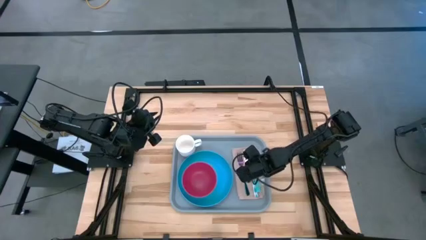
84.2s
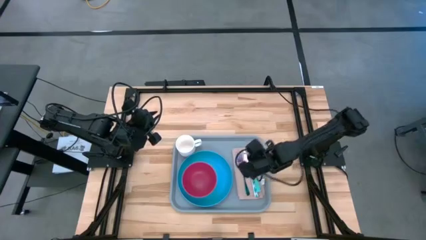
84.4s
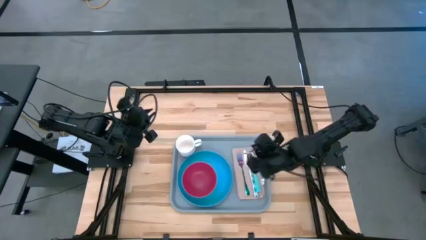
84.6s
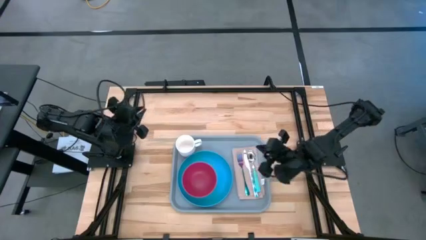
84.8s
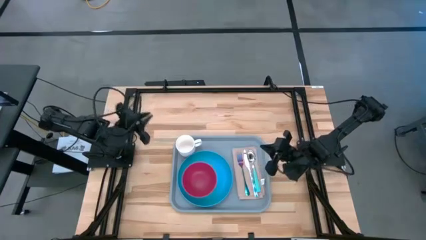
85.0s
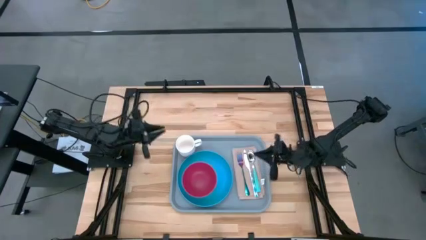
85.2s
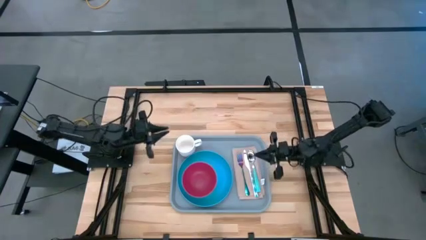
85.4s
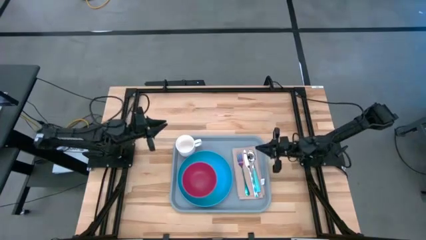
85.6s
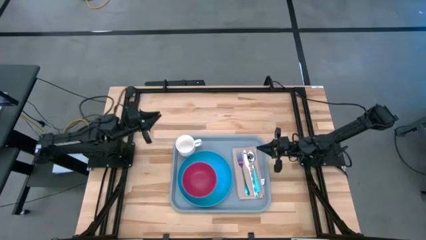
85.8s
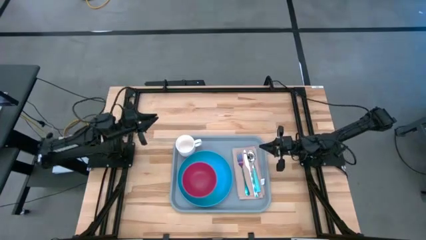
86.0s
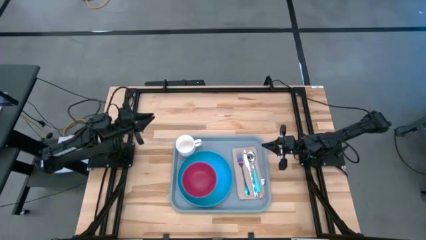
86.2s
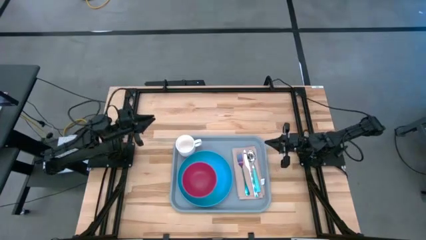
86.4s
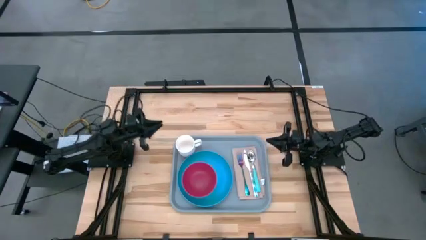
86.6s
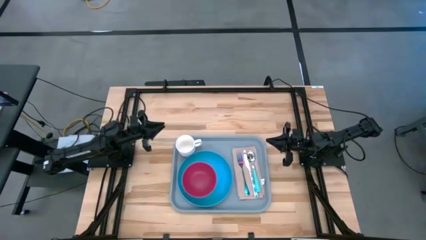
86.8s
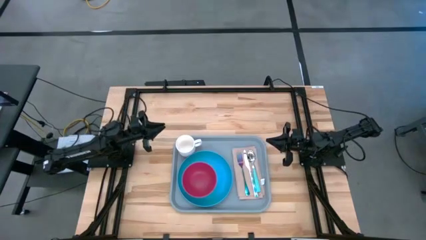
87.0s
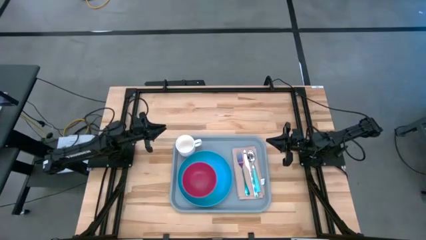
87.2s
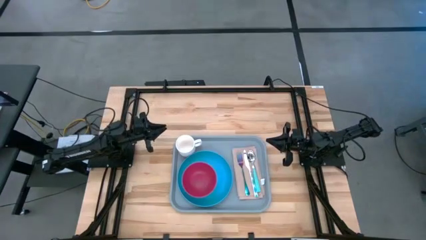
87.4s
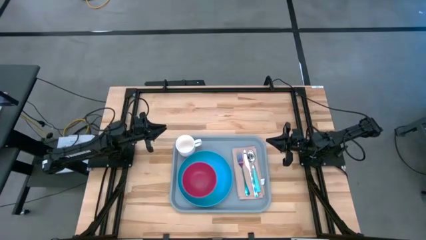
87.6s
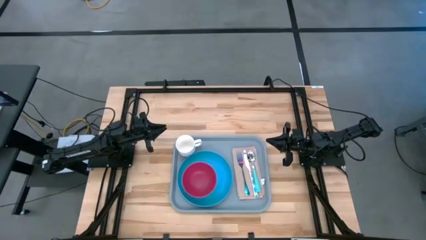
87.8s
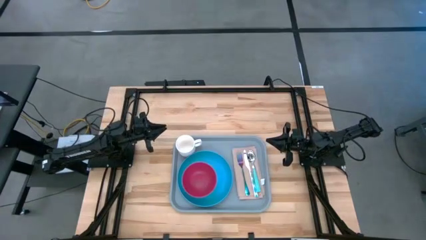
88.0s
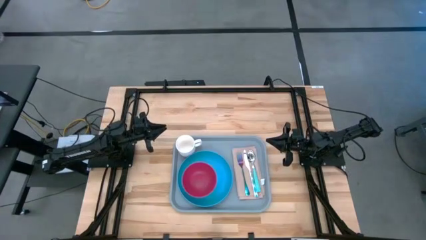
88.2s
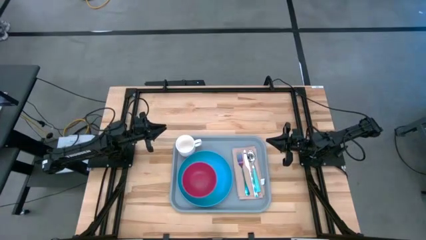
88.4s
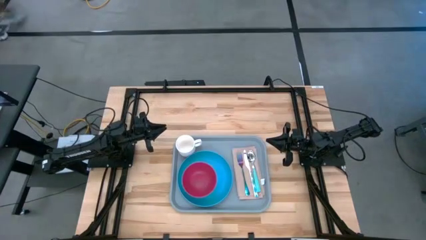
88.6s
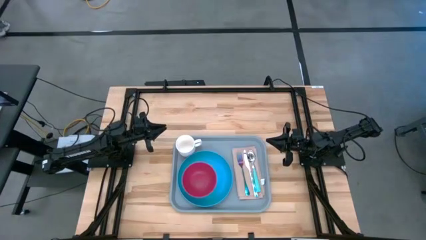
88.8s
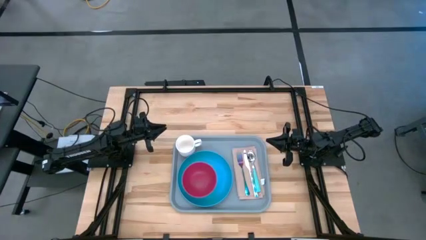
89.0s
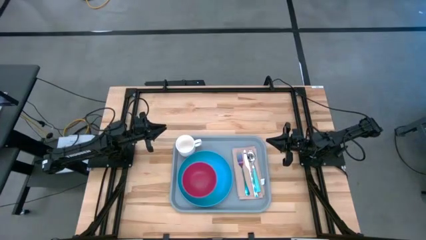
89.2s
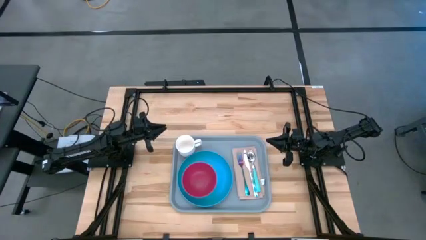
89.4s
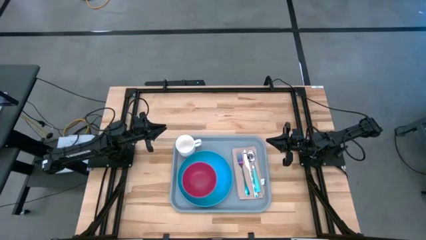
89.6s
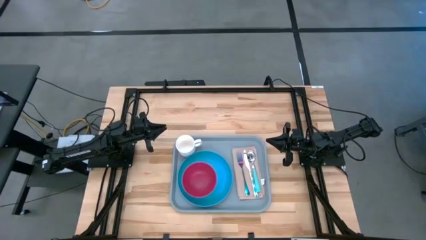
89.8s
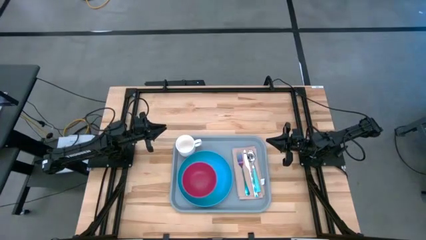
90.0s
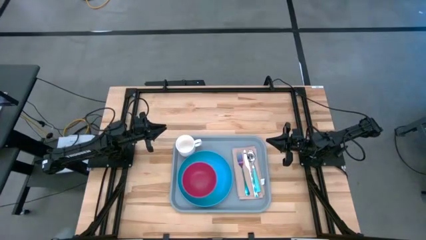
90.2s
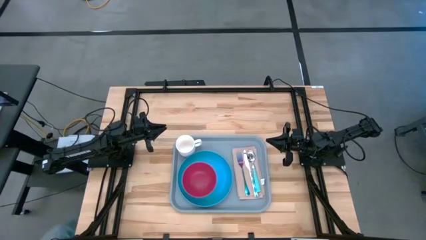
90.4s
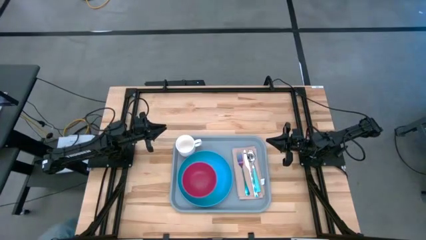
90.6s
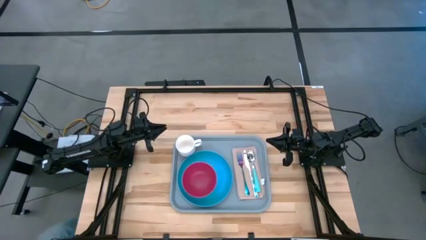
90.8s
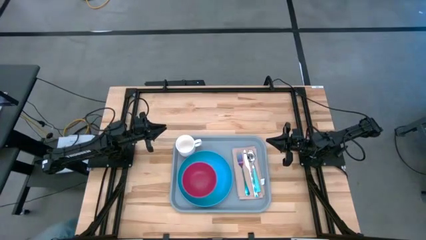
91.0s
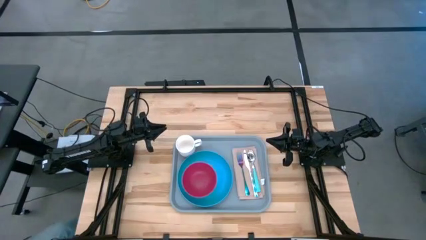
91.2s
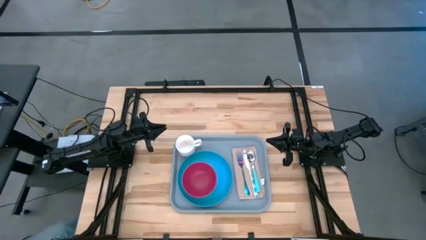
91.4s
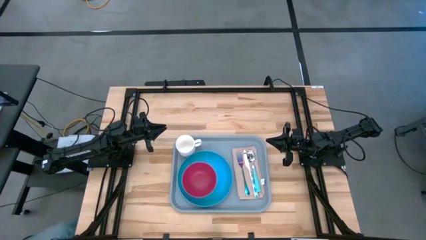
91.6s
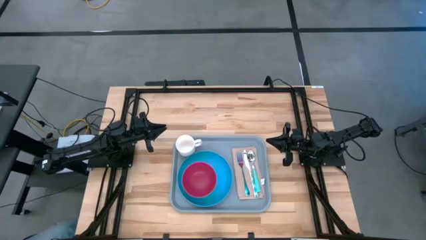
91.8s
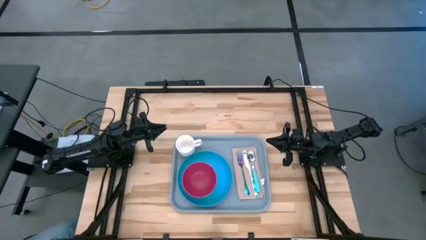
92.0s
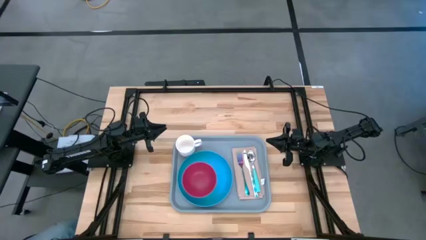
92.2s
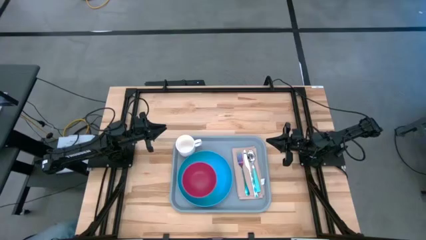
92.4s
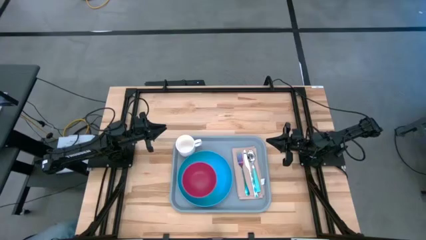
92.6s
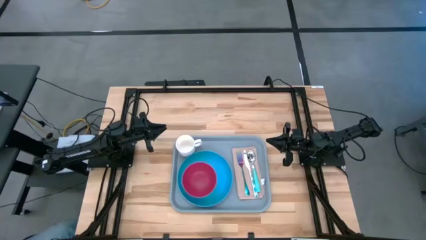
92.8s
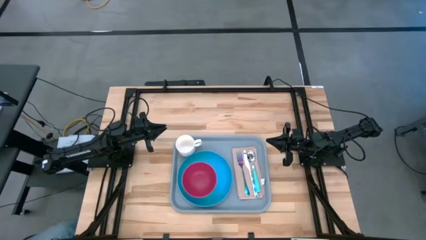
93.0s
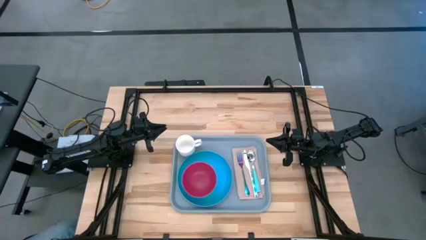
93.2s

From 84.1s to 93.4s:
Task: Set up tray
Return to Home Position

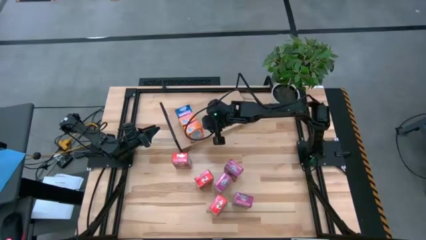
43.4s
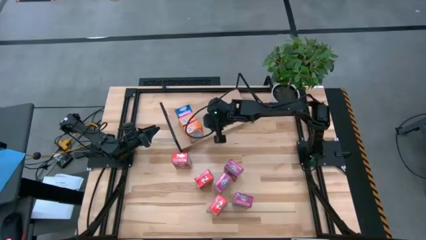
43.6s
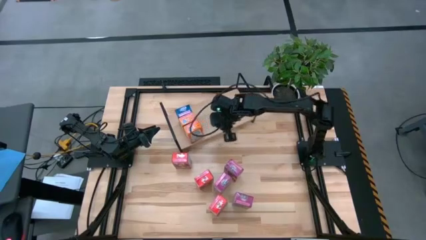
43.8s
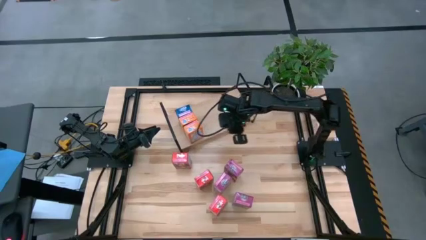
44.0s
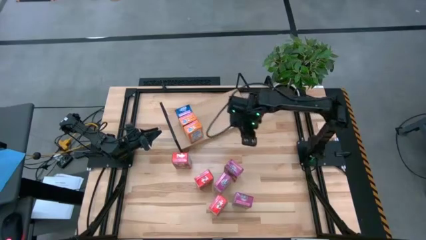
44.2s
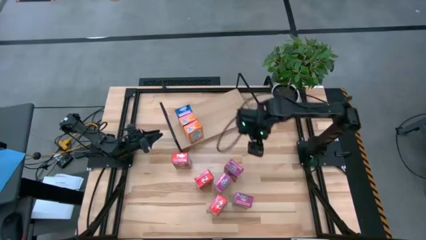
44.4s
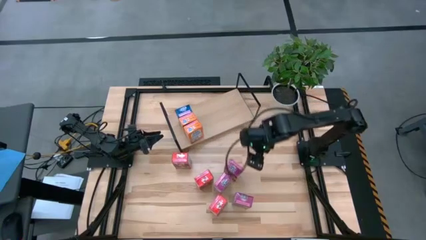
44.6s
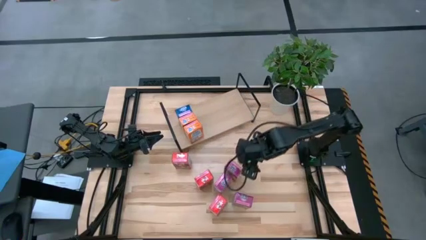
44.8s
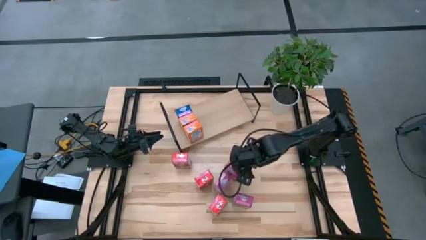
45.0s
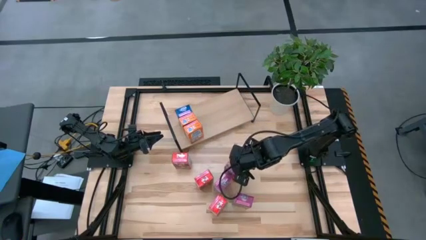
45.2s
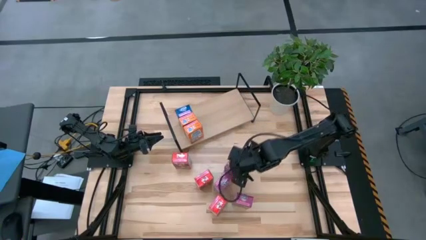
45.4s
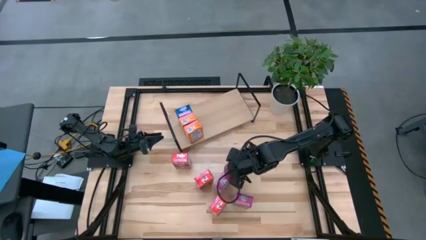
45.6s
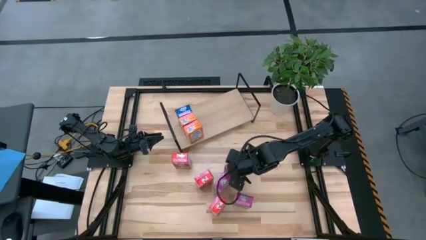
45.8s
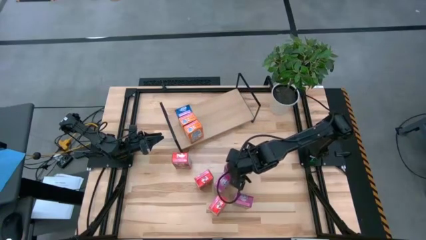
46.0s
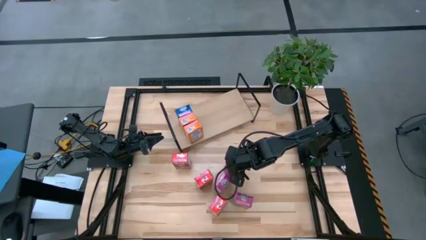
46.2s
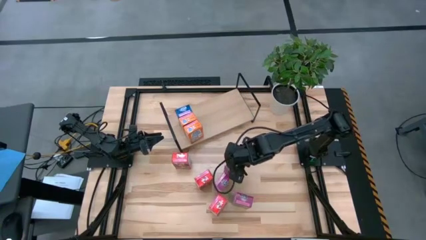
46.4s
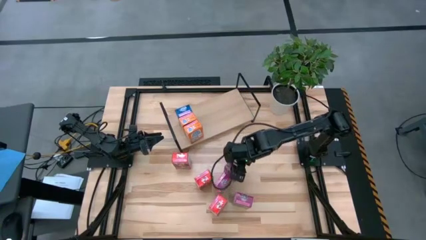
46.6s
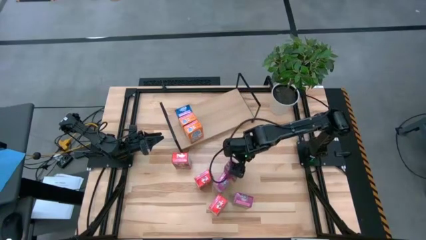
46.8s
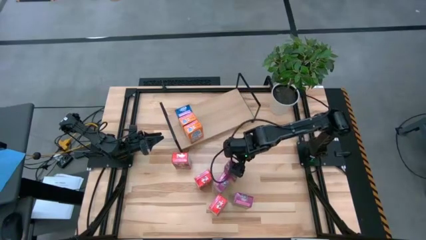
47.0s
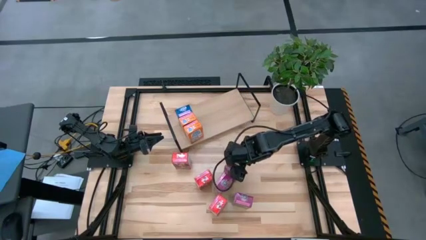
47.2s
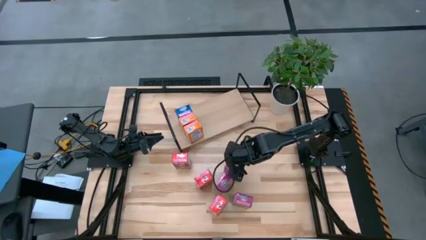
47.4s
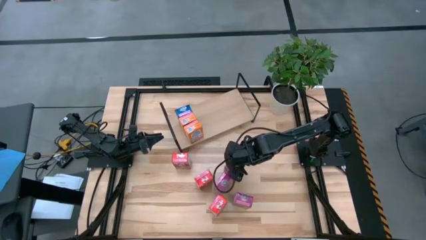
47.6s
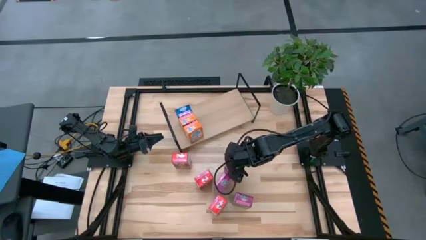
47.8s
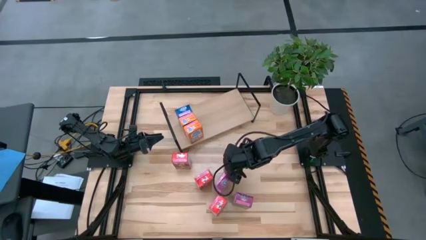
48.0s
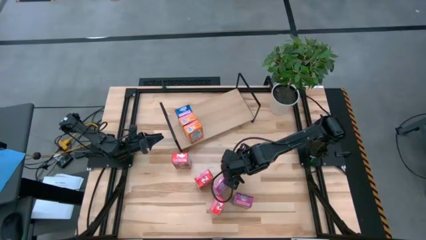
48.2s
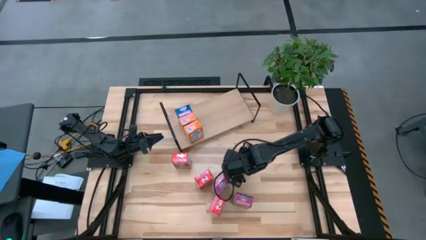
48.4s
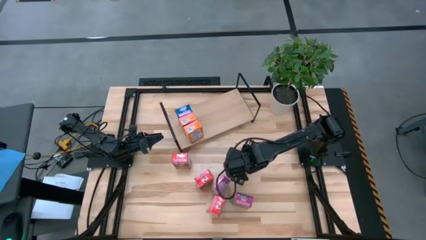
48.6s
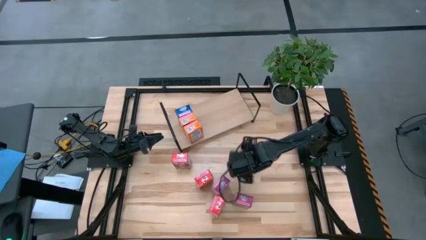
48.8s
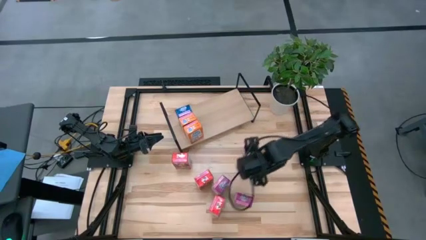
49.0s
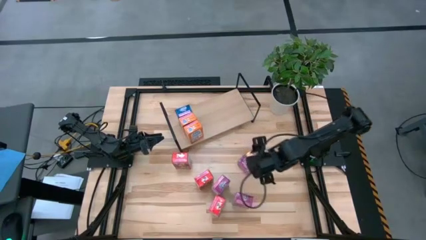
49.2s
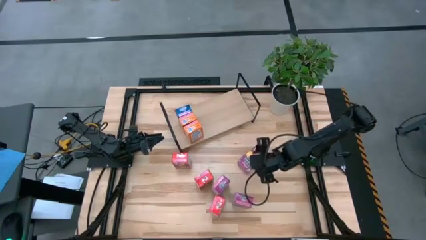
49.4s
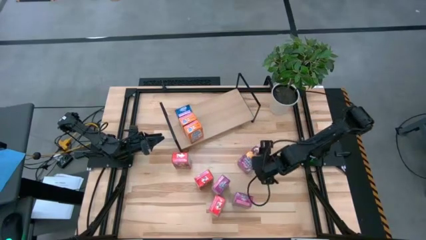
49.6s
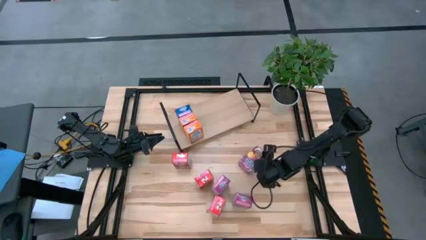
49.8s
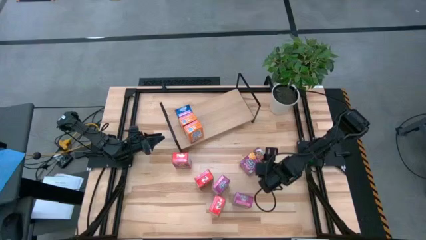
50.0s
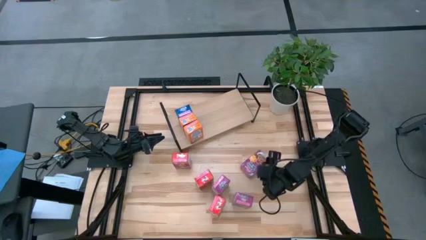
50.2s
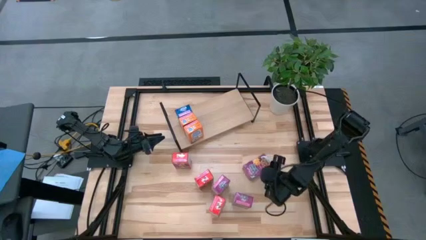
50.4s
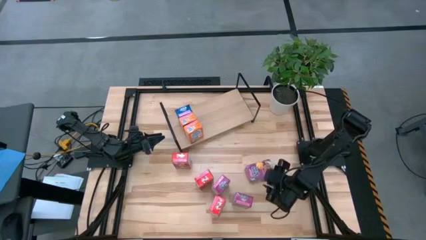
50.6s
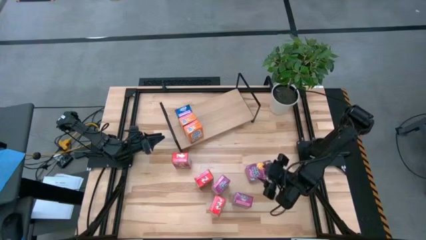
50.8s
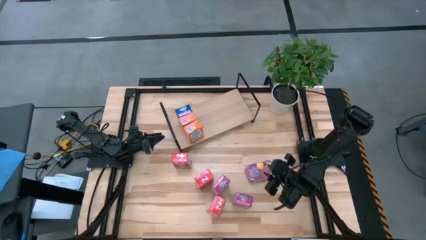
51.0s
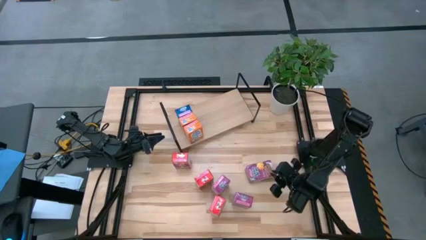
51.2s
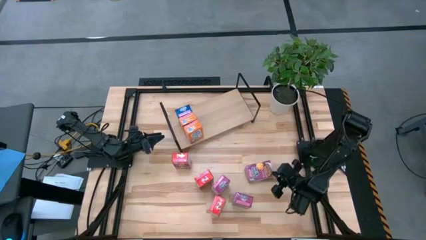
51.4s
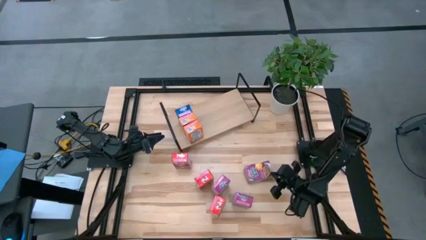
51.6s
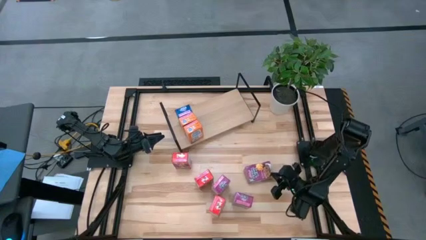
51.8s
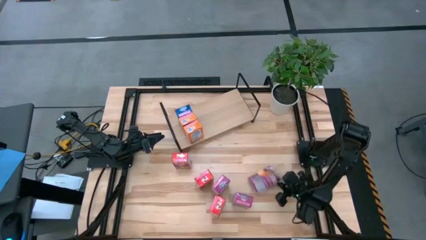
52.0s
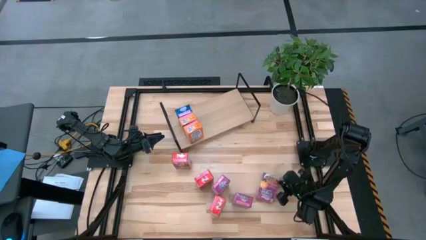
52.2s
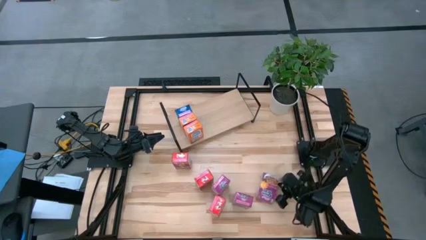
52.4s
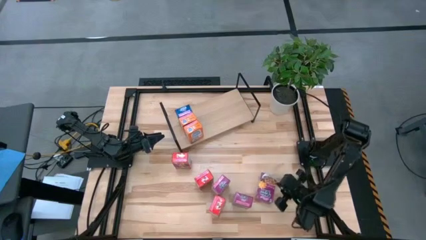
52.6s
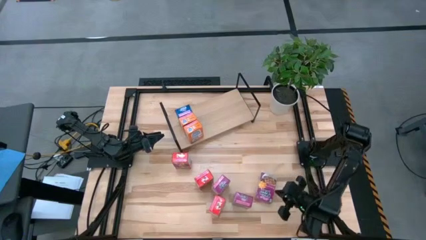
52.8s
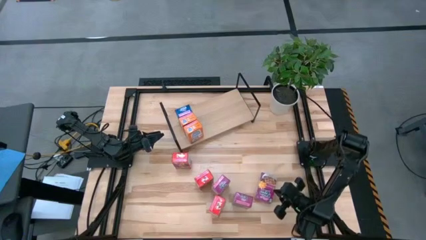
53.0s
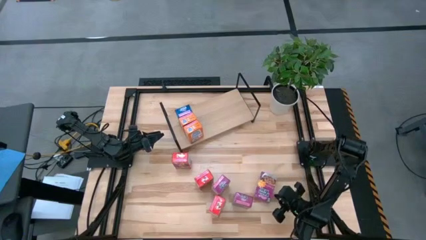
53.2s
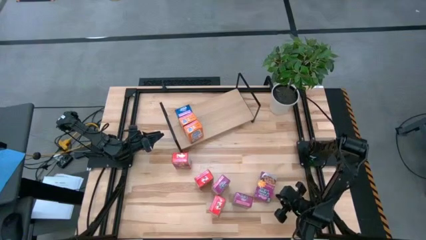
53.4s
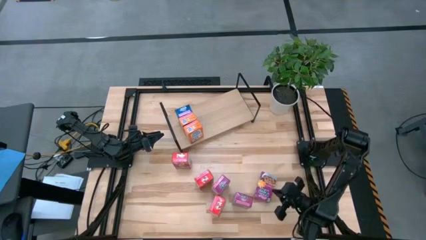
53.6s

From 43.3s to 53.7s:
Task: Stack cereal on shelf
Put the top purple cereal box on the shelf
